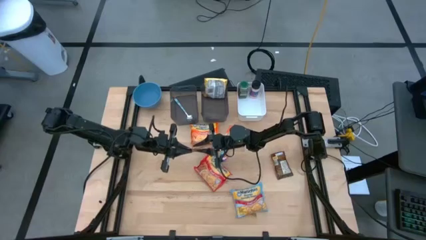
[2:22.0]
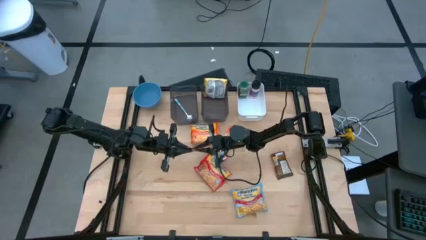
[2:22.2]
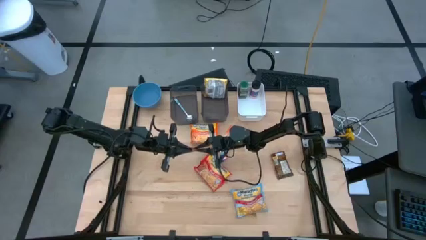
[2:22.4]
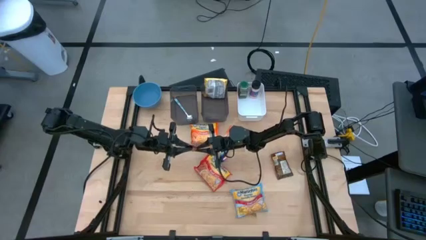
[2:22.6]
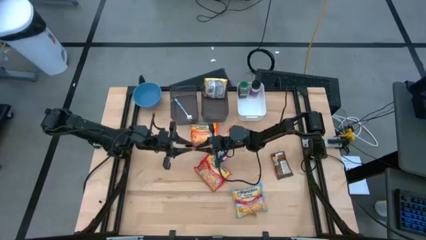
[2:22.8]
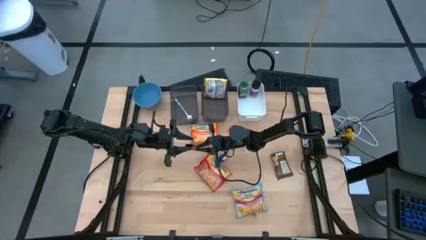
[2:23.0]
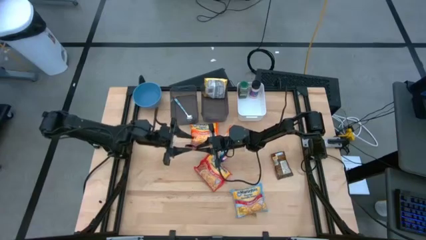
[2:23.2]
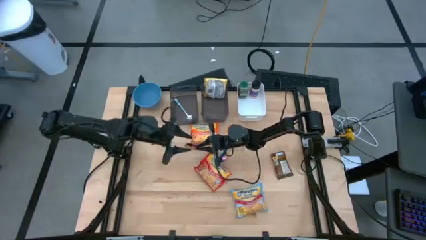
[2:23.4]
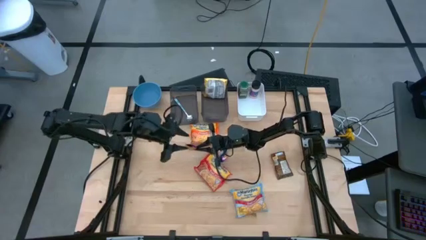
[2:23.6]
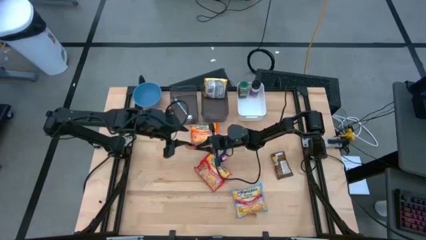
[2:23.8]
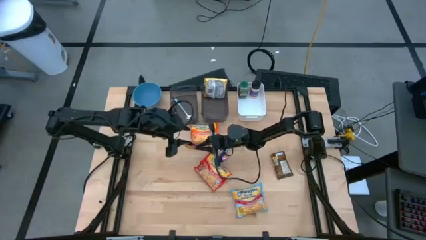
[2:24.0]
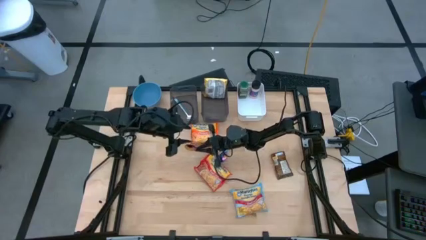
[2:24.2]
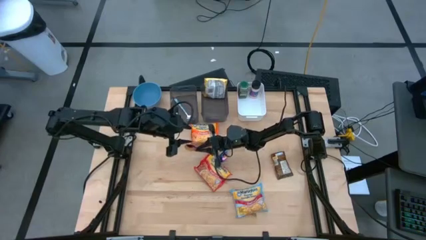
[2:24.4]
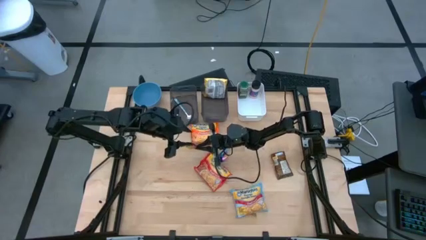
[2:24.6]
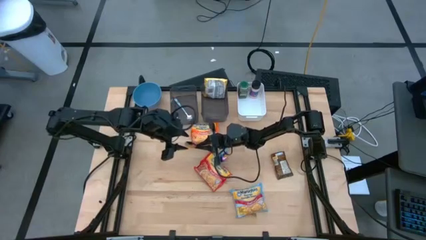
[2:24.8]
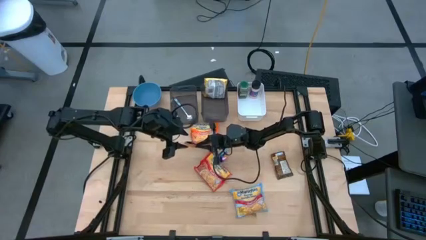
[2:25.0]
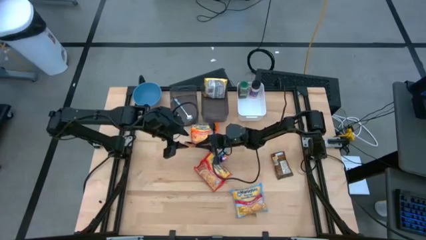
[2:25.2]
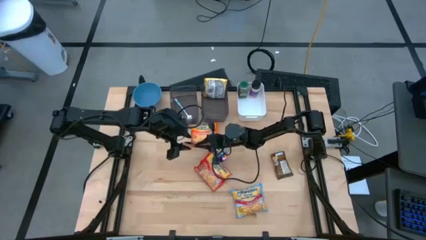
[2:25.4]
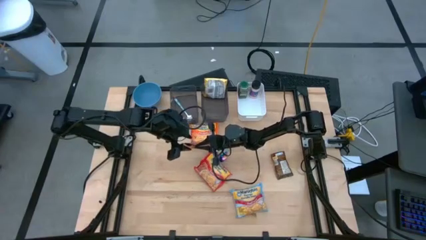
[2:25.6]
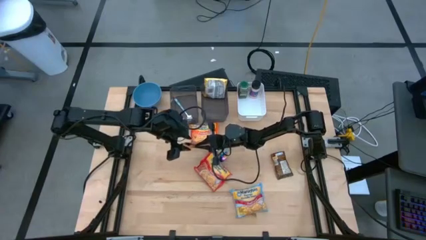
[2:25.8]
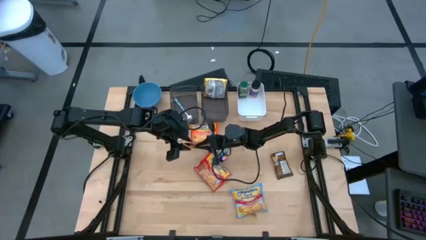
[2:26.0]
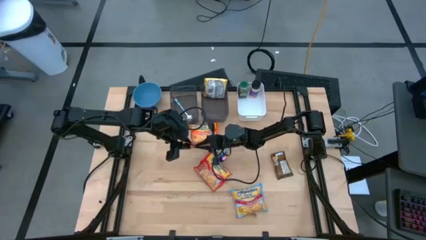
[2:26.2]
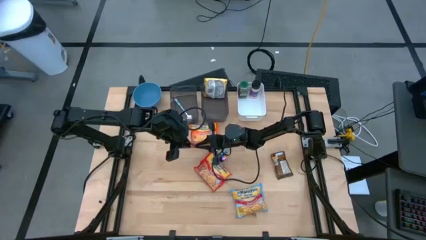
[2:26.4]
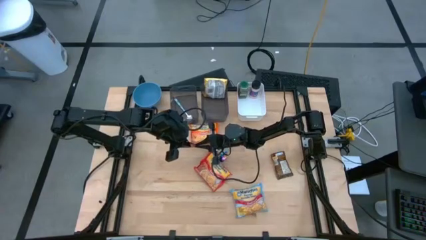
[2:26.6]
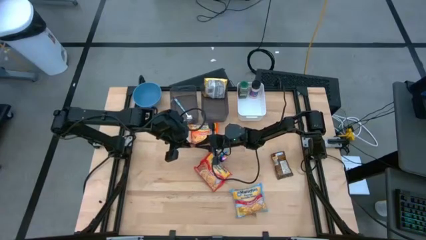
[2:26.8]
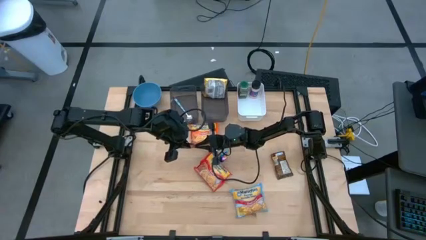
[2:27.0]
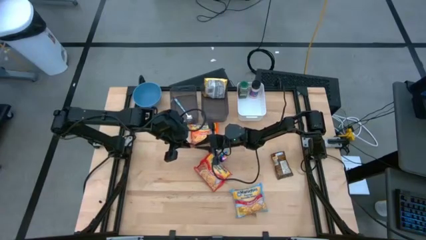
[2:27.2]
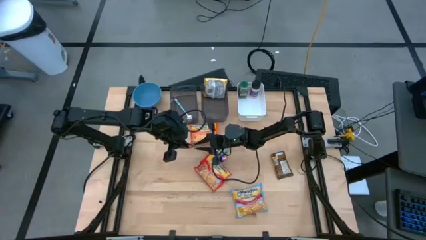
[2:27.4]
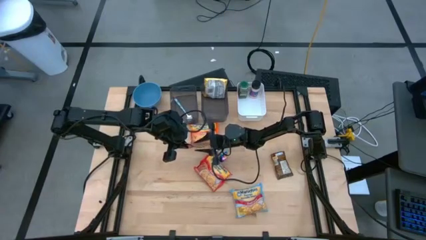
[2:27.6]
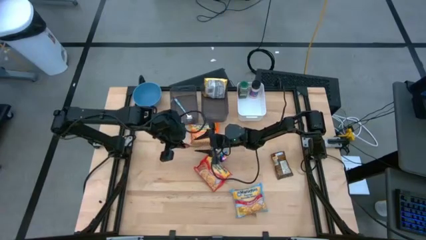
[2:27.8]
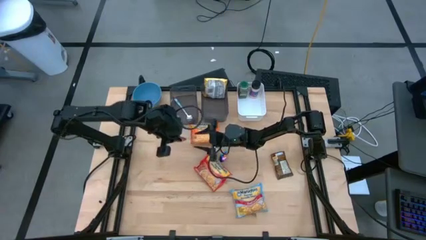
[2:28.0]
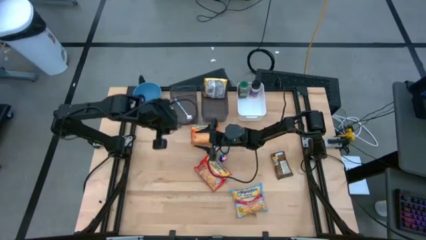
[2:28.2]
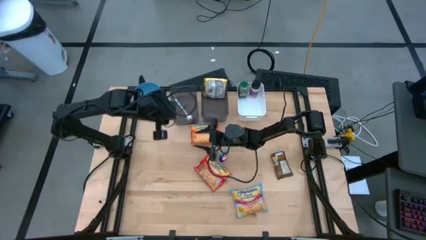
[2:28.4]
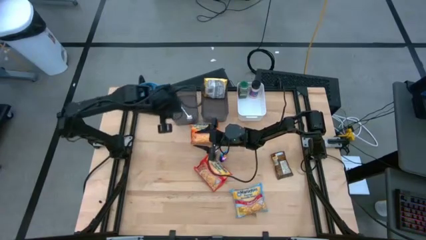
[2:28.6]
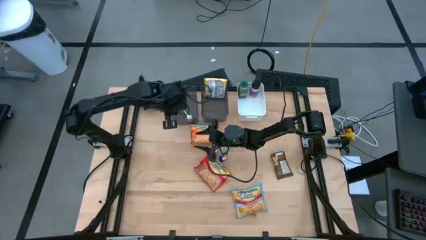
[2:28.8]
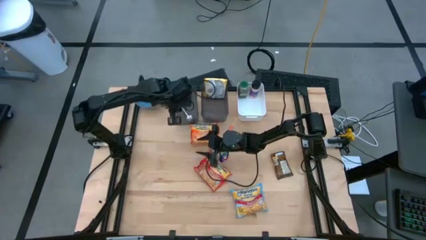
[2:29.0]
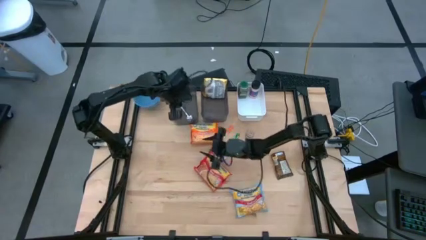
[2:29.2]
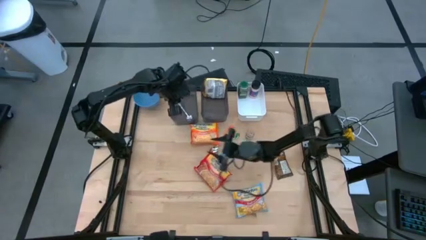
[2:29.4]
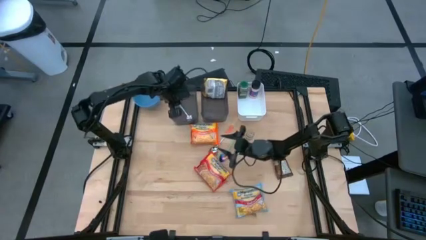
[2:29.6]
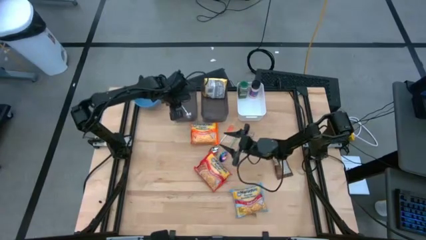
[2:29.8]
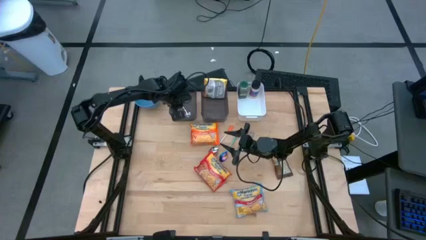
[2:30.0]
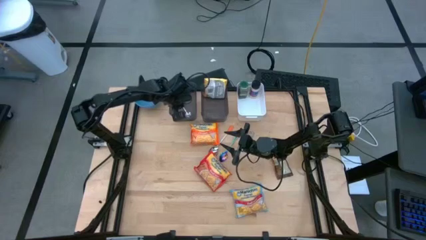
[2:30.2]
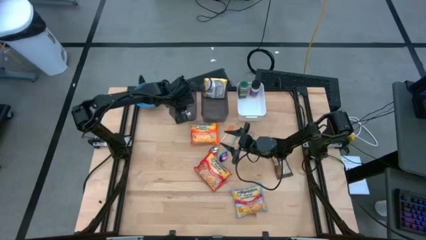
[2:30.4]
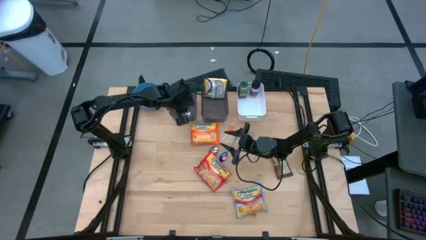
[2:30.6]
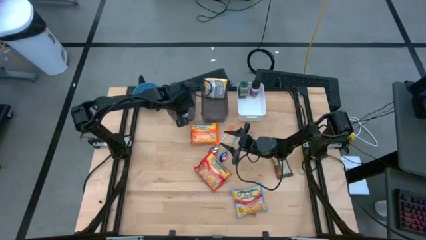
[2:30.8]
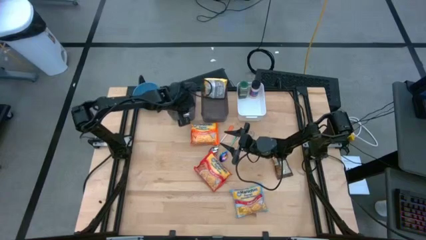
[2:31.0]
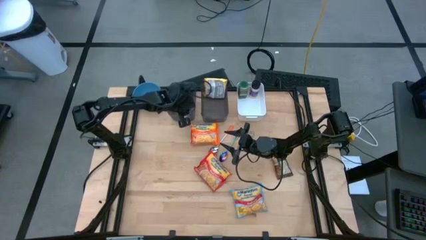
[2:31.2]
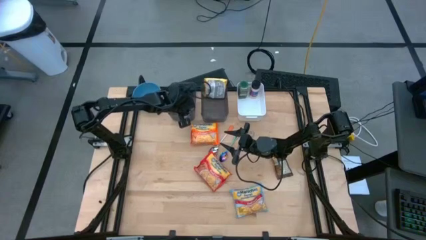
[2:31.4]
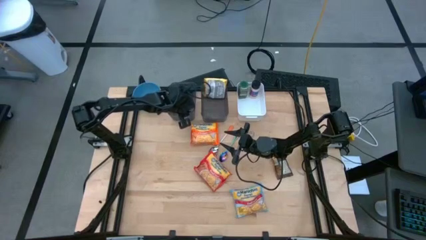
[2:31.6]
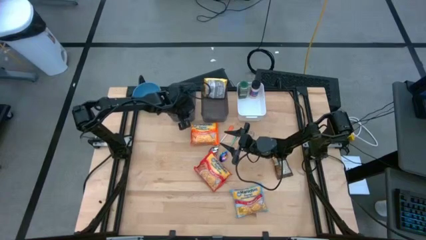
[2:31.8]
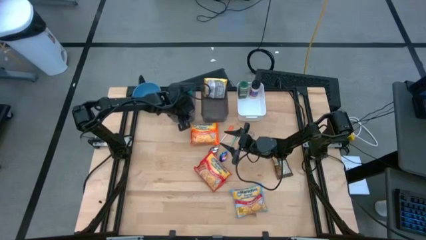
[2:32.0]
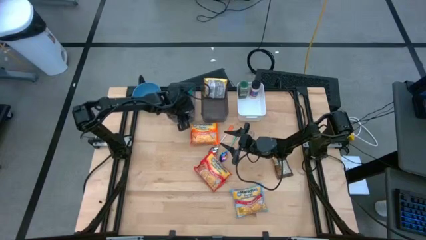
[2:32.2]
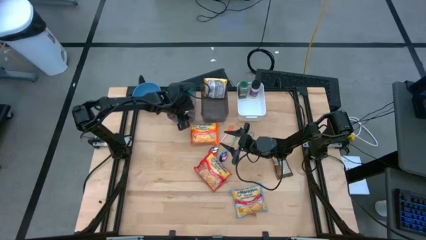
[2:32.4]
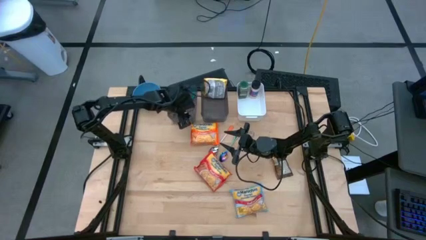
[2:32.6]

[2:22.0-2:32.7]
Task: Pick & Place Food Item
Put the blue spoon into the left black bin

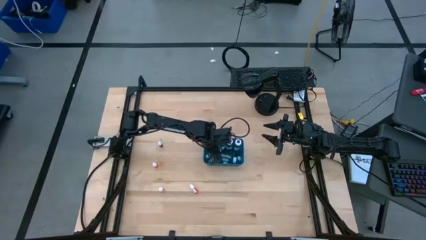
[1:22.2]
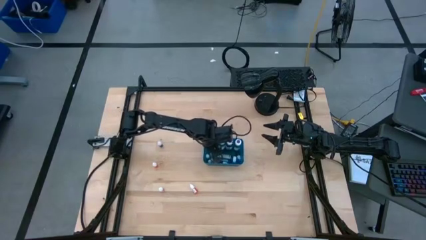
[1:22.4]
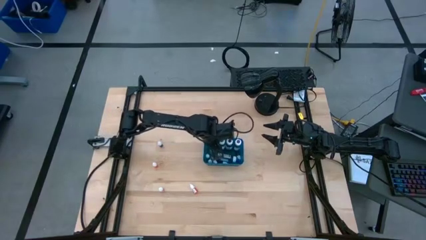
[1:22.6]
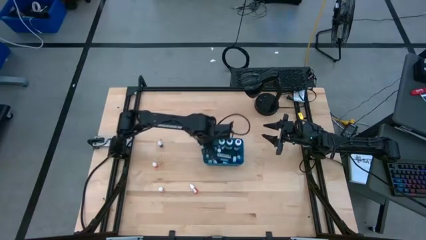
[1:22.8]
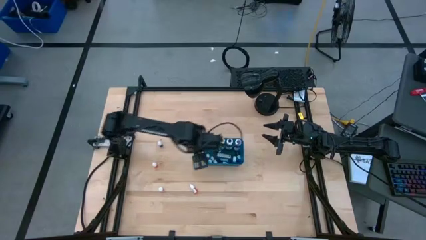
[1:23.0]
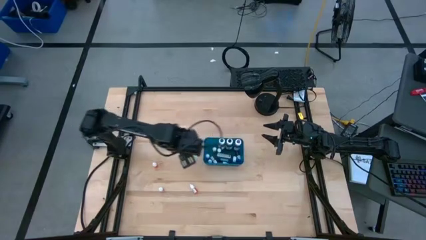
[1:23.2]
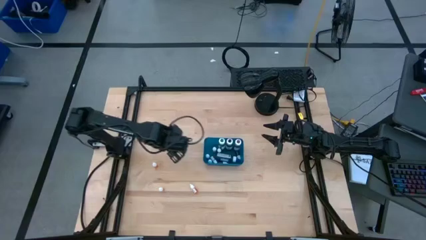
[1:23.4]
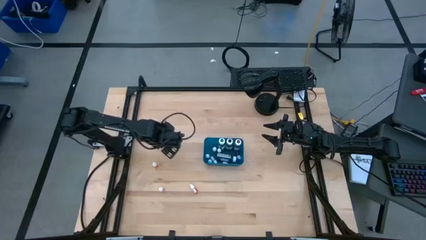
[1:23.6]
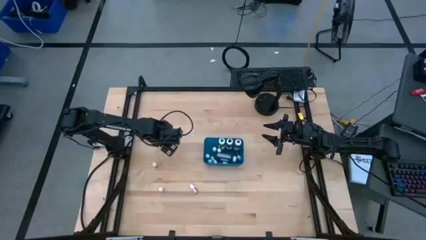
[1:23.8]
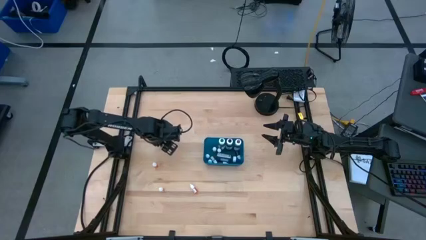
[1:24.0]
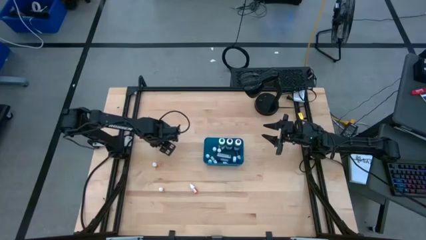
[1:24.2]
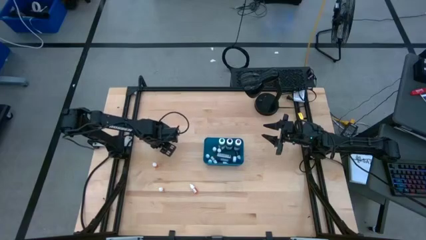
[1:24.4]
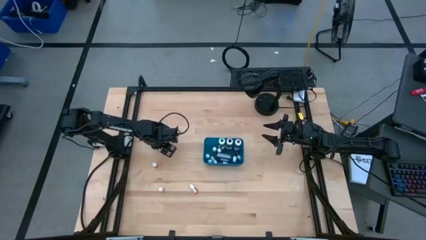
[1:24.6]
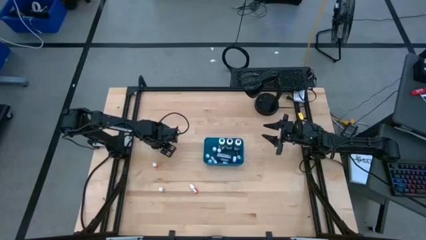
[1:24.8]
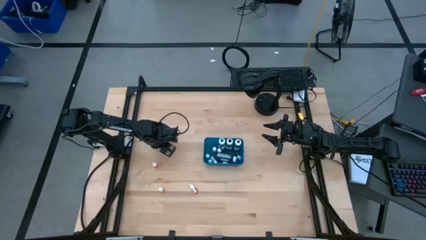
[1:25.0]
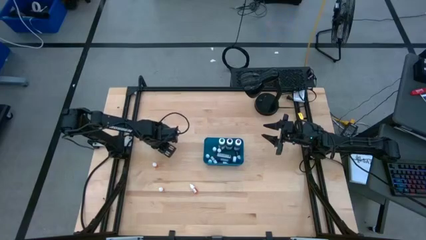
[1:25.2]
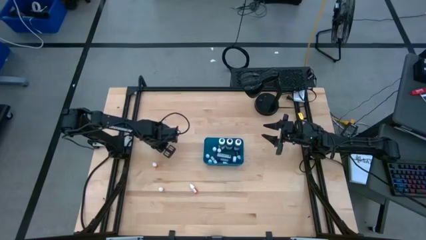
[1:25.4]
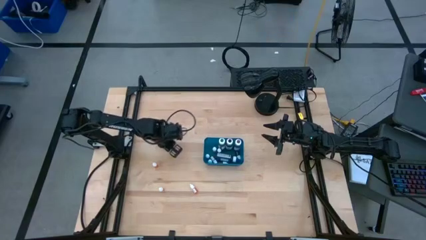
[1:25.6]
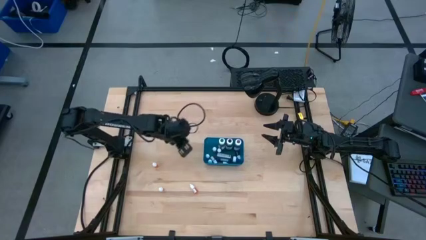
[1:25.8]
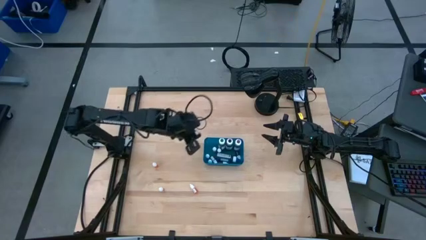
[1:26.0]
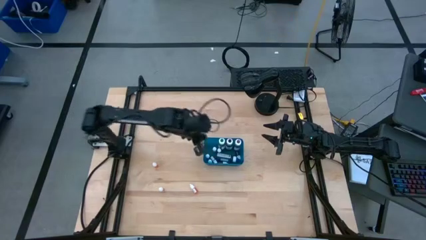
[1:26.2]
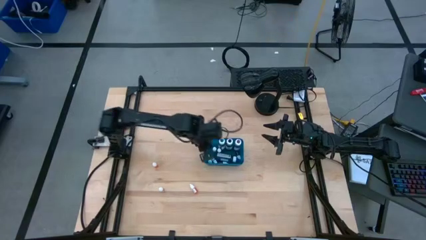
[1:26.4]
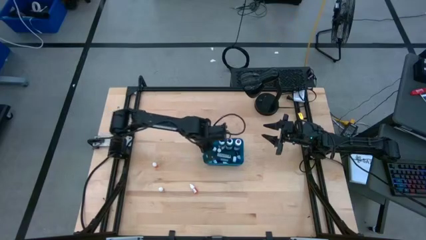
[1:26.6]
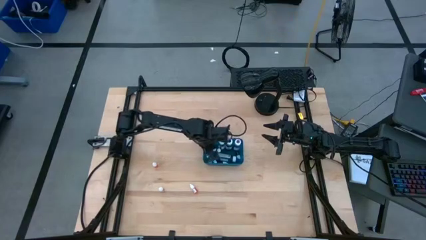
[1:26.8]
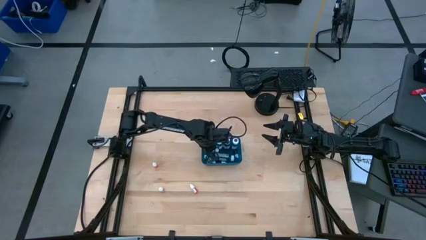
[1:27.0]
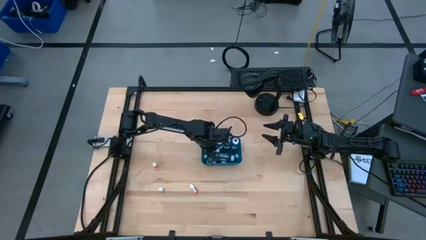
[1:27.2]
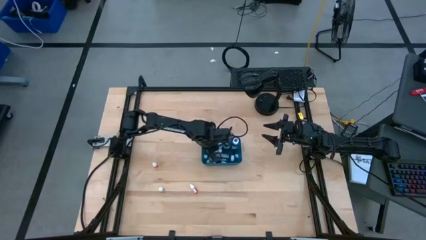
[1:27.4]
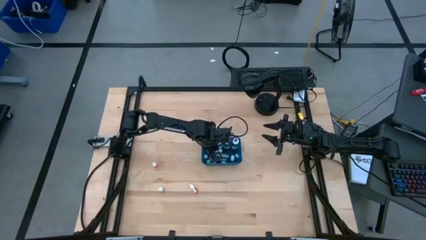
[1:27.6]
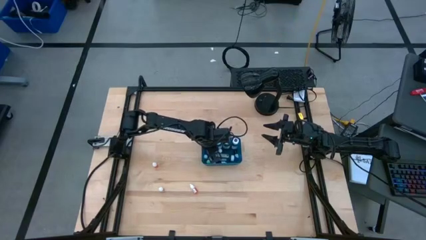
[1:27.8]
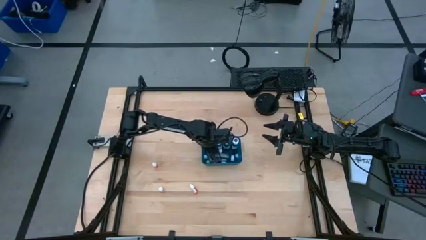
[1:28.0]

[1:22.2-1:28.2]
Task: Pick & Place food coloring
Put the small purple food coloring bottle into the blue container
